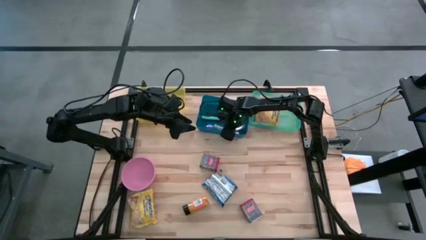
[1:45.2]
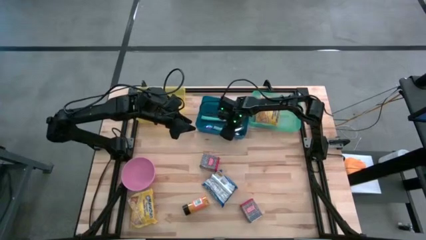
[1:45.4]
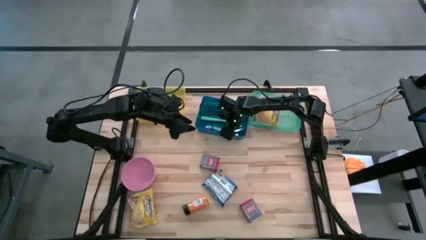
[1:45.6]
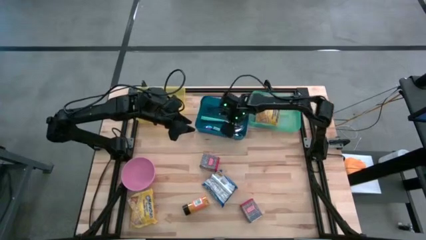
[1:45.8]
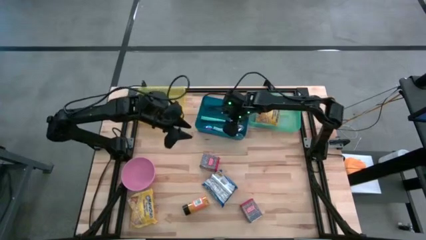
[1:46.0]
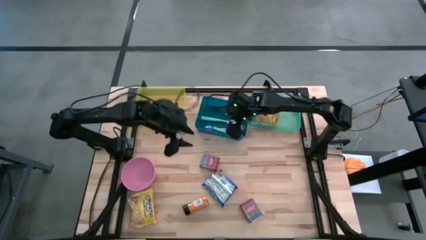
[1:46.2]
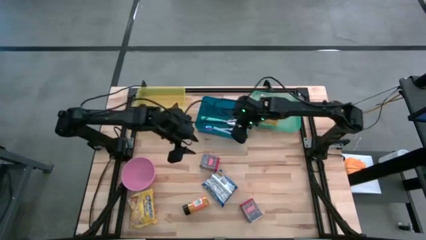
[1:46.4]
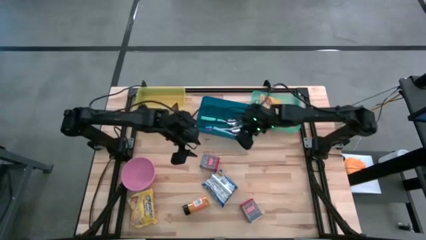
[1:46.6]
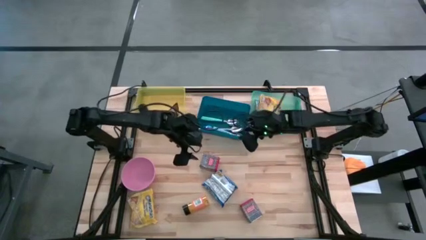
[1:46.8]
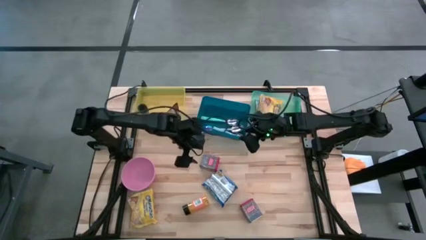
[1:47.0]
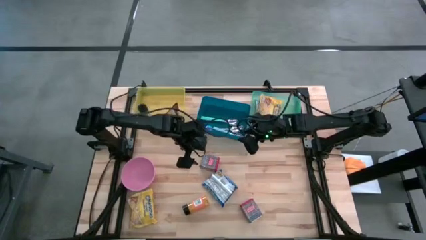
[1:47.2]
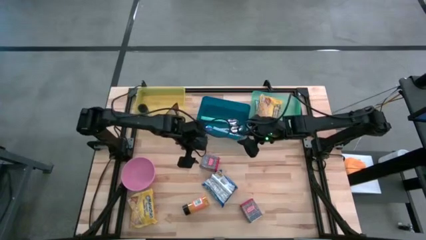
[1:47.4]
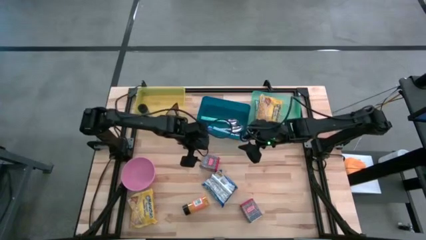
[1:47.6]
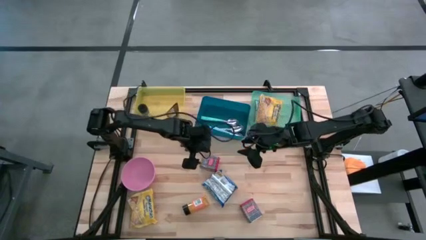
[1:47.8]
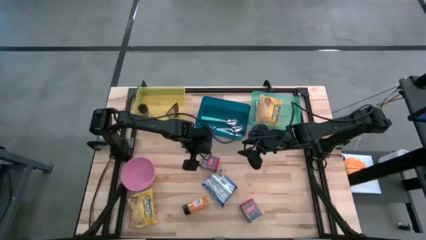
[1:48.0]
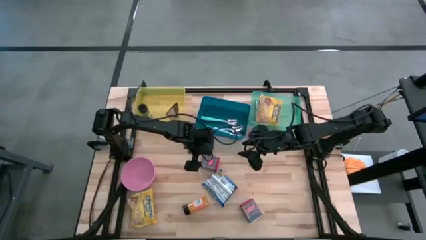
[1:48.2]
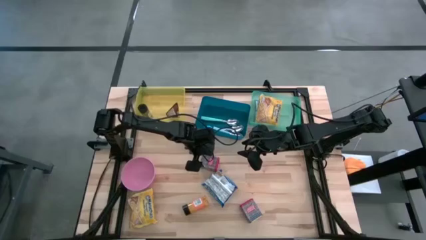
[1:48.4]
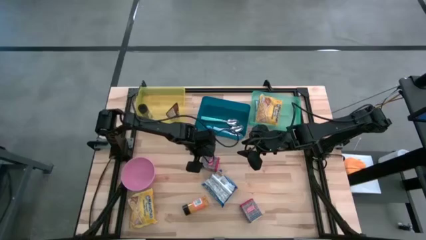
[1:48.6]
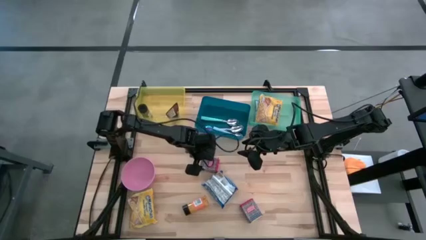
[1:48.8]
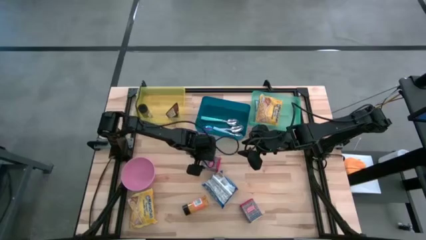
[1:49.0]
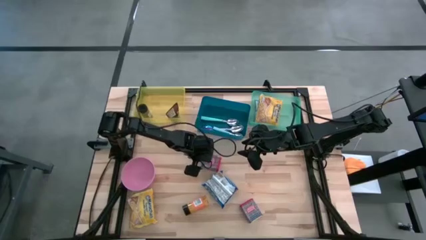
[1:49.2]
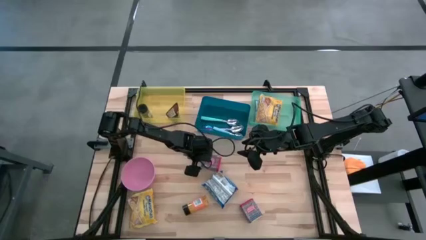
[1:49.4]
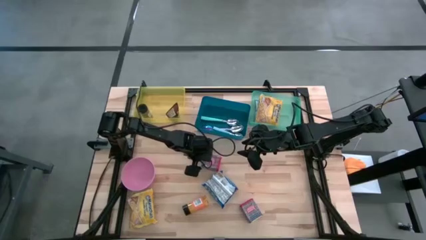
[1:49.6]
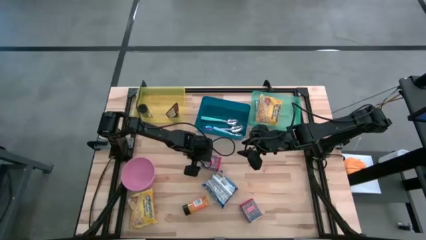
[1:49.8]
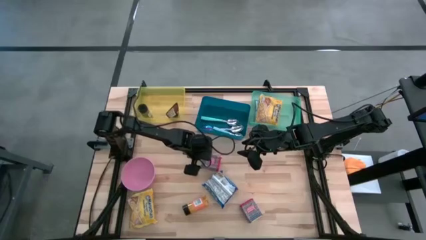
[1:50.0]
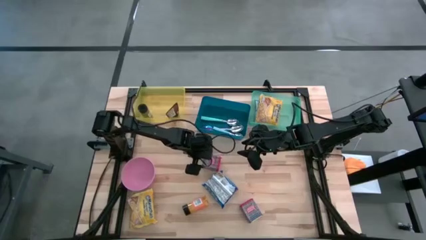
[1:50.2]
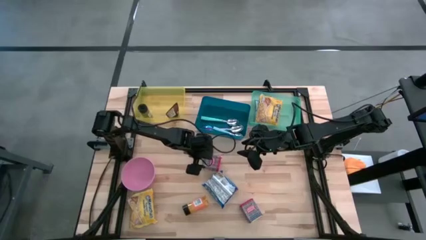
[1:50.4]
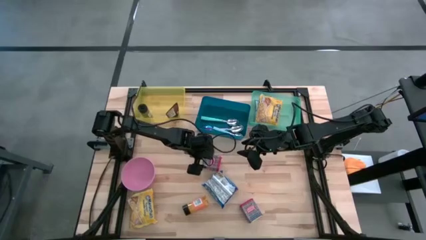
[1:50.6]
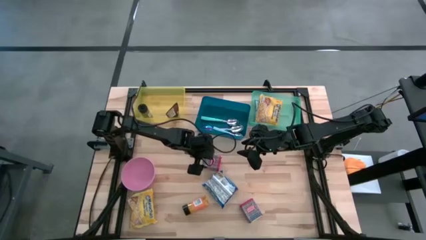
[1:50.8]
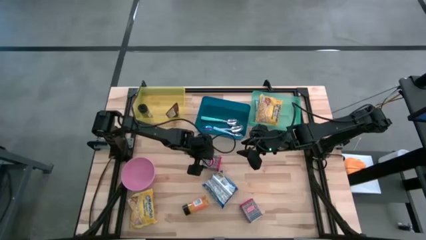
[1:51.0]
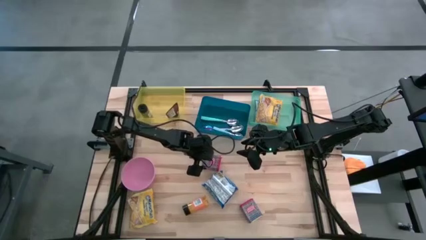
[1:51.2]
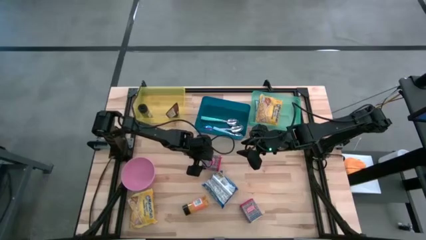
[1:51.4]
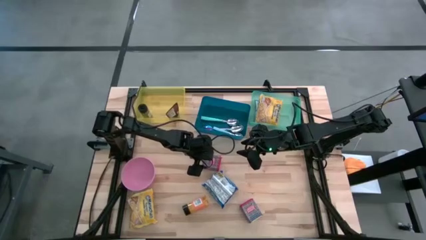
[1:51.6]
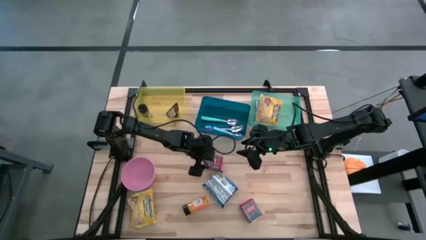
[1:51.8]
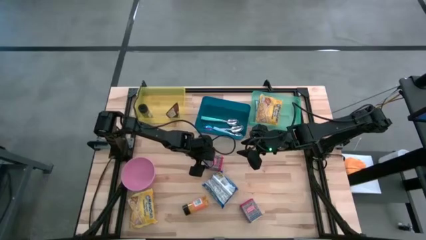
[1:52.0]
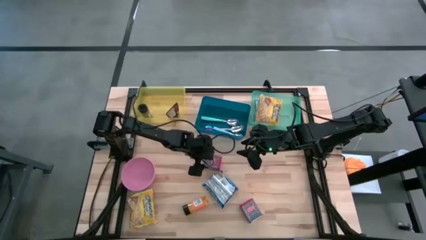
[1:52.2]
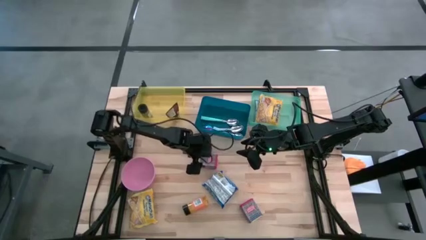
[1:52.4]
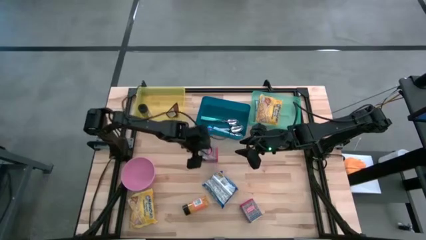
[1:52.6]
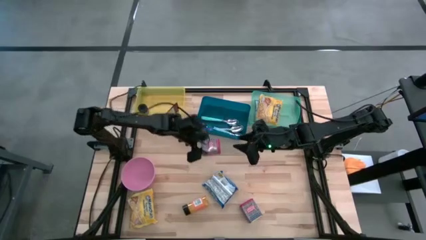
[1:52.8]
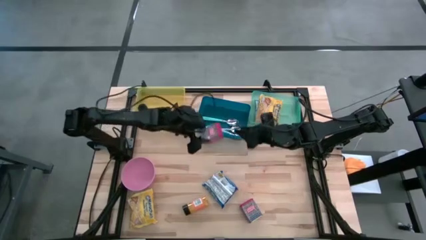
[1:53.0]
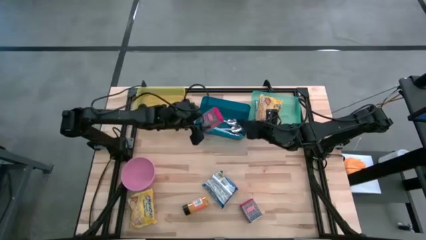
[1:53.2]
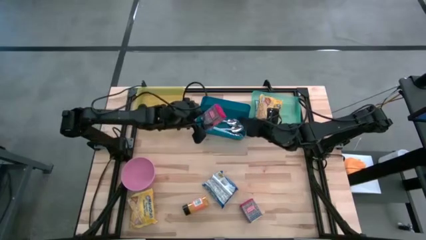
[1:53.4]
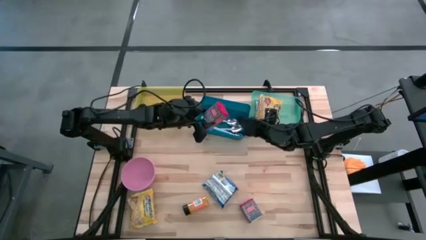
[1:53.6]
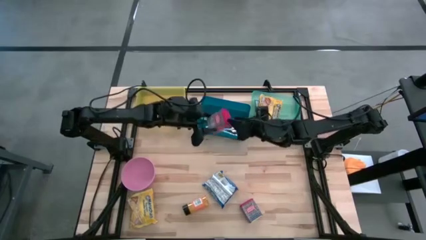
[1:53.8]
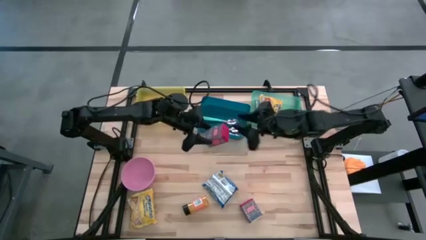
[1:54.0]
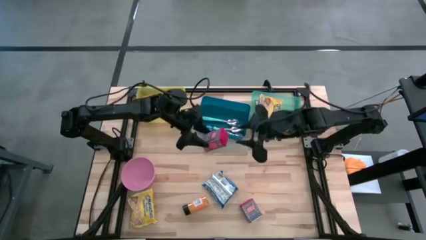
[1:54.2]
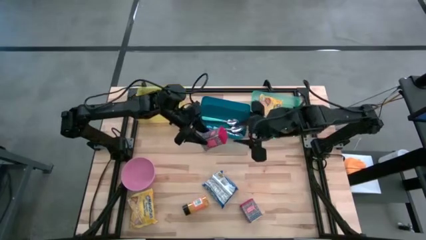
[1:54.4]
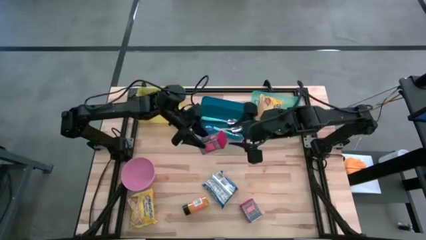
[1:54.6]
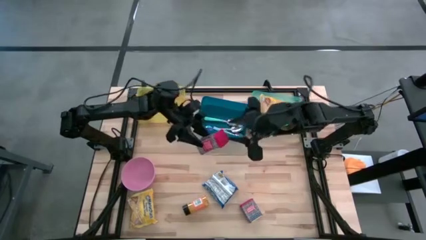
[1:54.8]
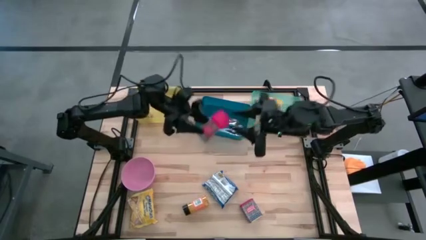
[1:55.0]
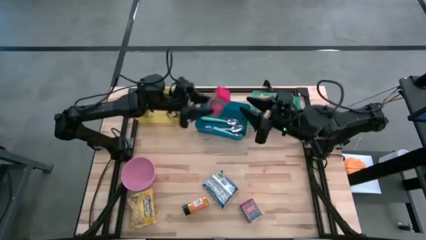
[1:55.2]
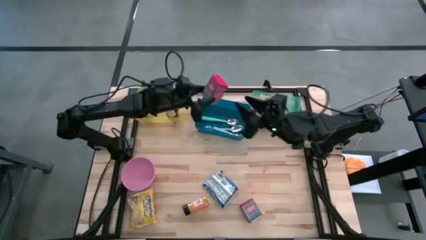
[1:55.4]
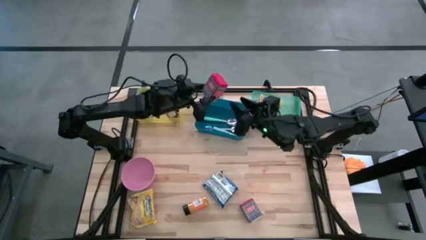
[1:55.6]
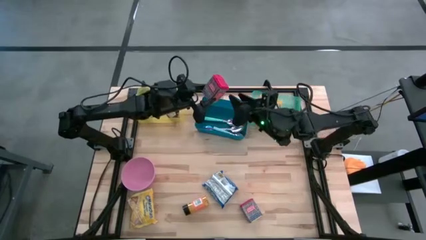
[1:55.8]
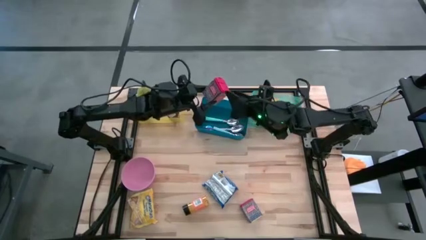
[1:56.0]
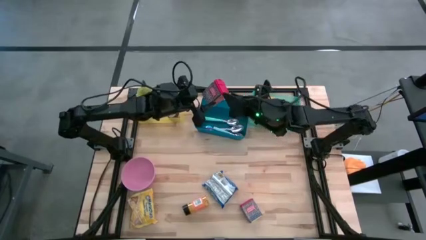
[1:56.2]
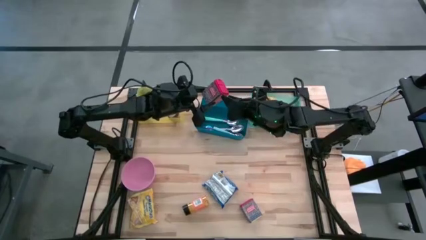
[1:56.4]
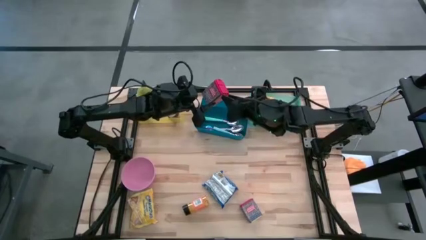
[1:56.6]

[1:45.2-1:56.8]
Put the red seasoning can into the yellow bin

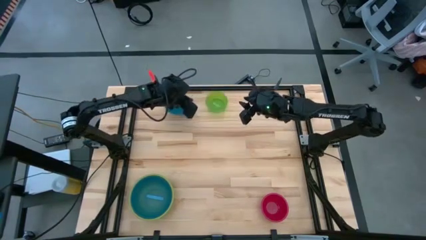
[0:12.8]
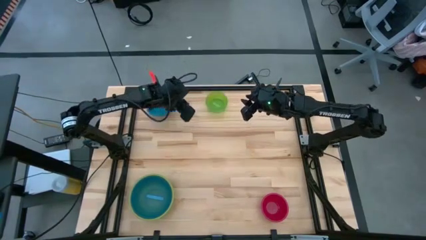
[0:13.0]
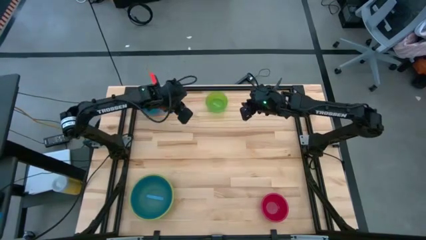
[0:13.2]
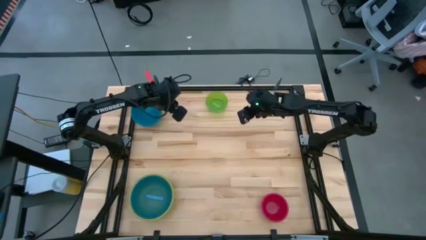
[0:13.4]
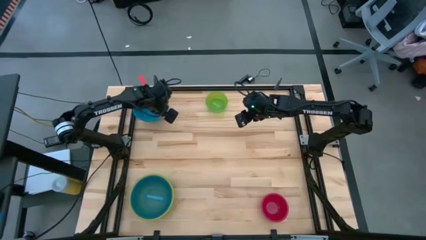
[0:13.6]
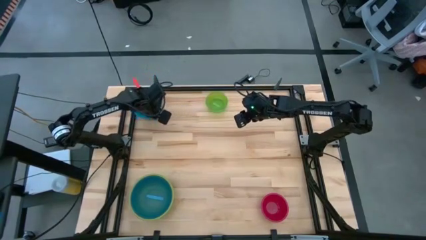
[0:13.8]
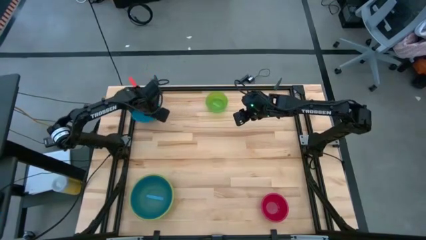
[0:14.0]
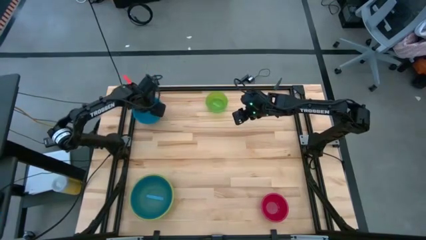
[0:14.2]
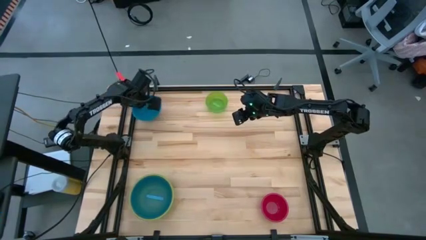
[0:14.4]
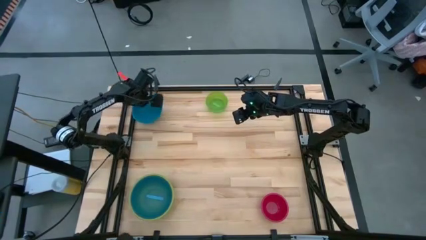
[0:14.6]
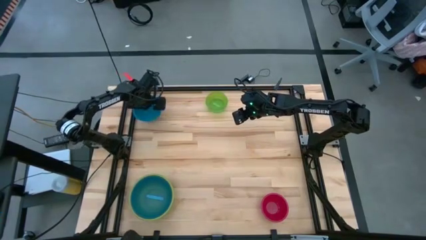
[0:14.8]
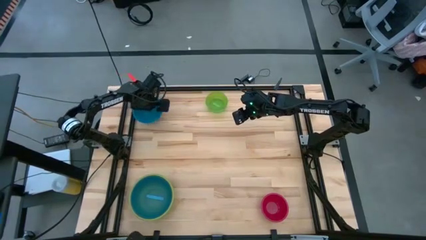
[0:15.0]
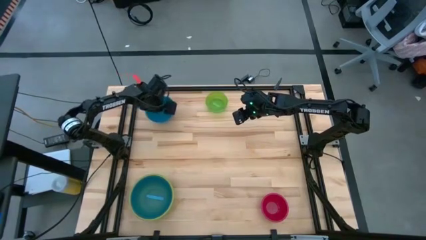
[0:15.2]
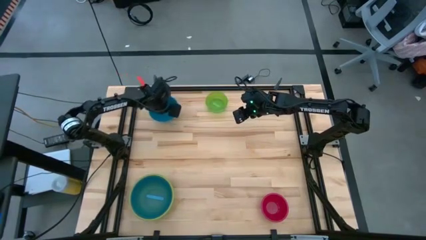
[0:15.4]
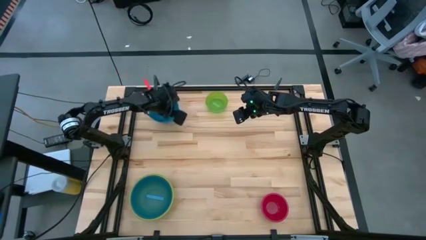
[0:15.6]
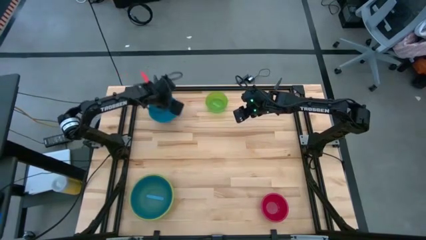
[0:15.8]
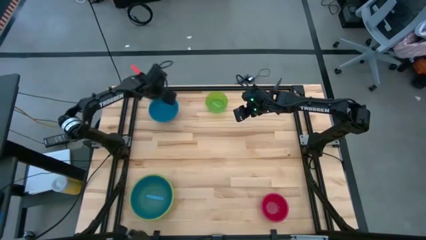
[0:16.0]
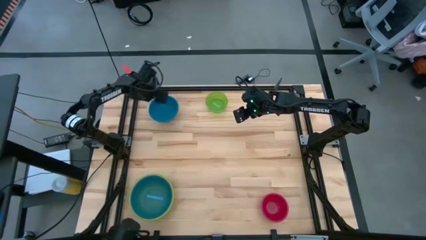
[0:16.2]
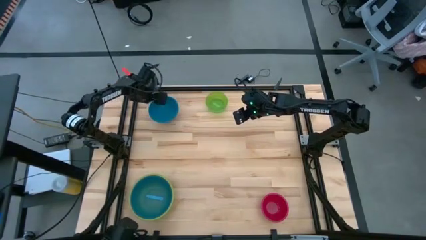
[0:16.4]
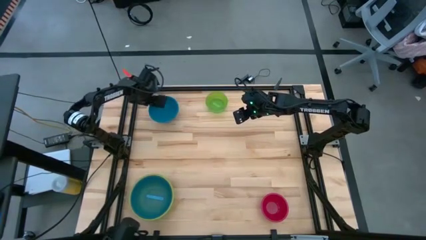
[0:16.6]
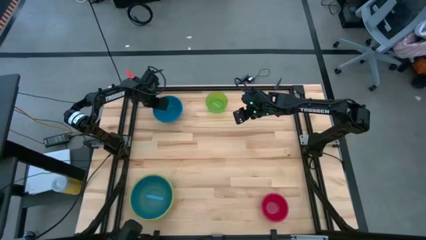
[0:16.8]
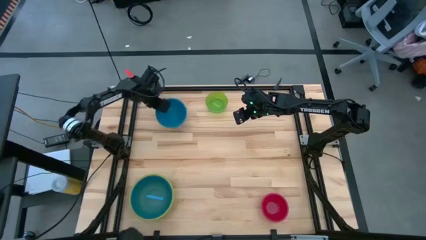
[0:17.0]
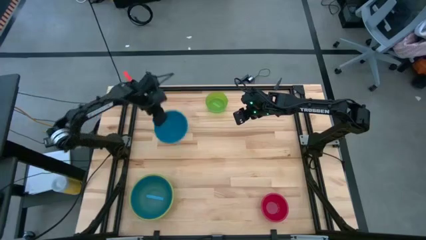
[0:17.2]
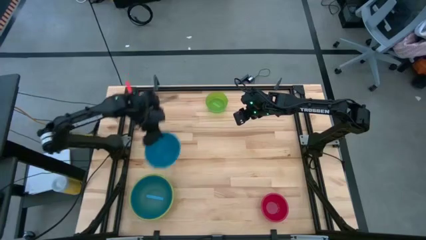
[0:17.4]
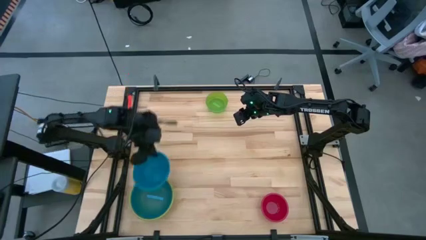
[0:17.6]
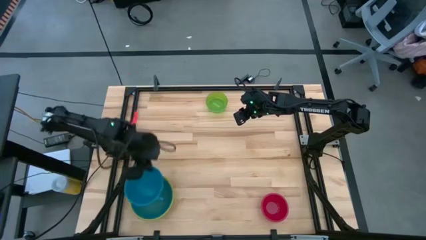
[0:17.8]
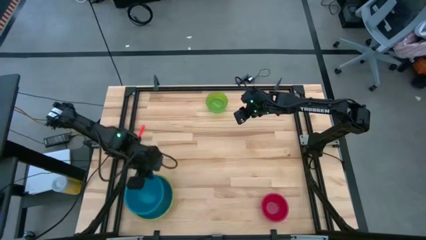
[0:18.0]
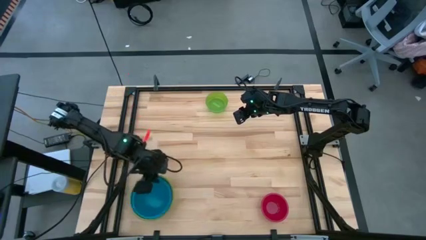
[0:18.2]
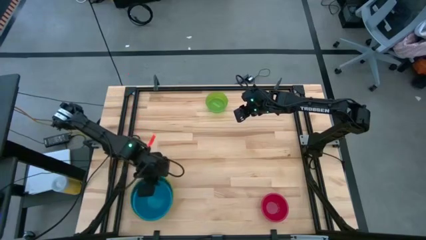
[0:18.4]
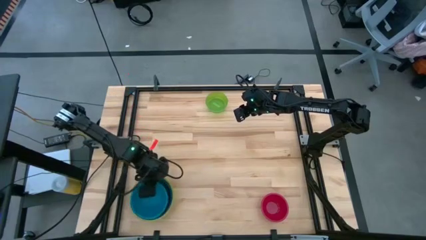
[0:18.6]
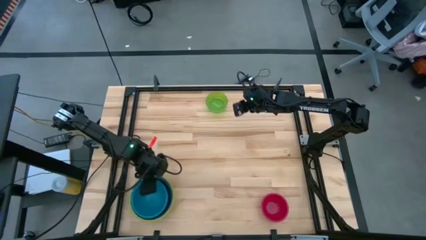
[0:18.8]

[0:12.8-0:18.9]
Stack the top blue bowl on top of the the light blue bowl
